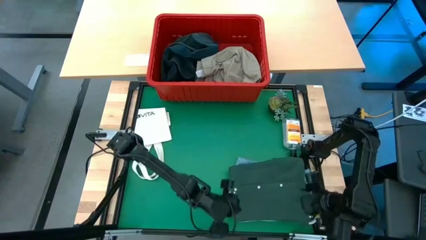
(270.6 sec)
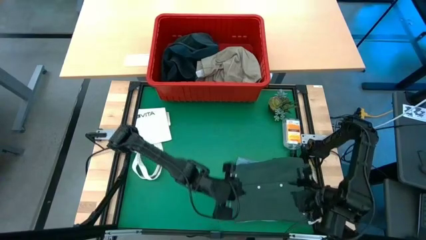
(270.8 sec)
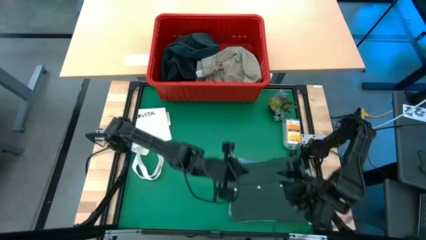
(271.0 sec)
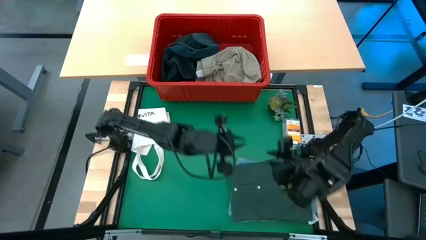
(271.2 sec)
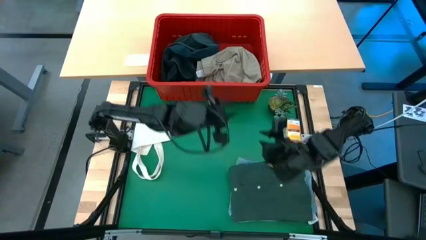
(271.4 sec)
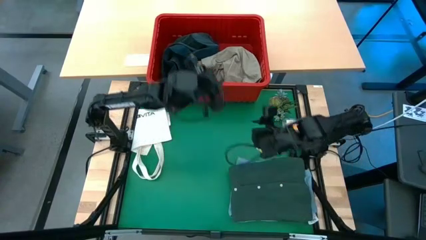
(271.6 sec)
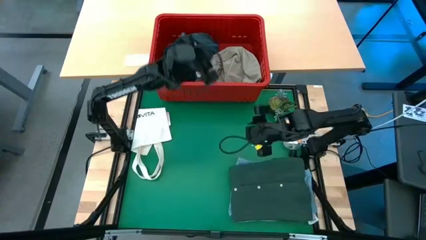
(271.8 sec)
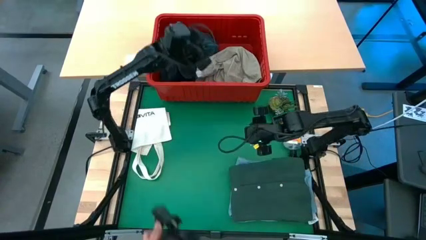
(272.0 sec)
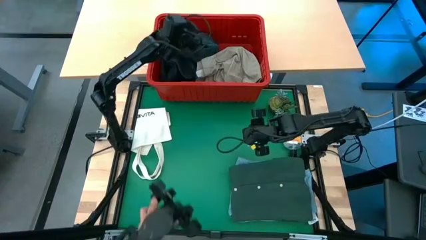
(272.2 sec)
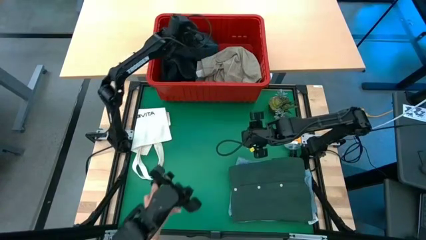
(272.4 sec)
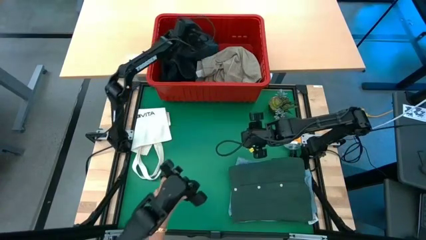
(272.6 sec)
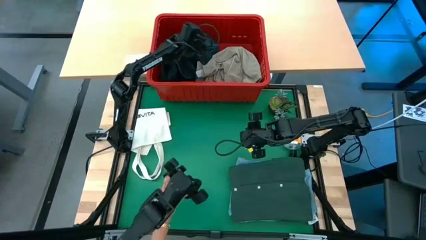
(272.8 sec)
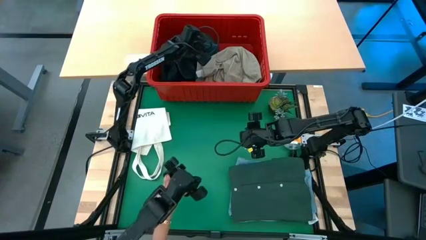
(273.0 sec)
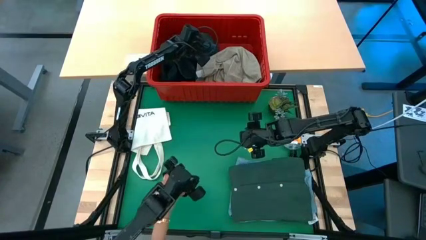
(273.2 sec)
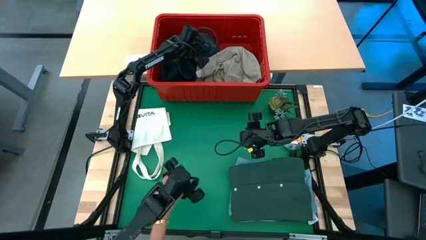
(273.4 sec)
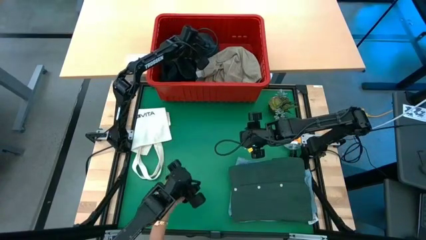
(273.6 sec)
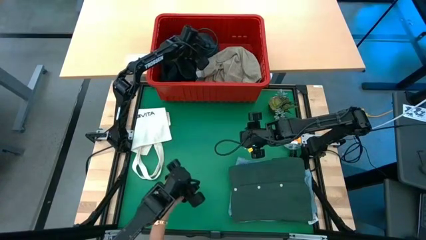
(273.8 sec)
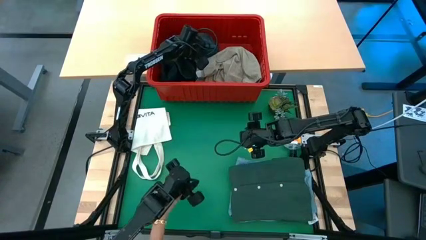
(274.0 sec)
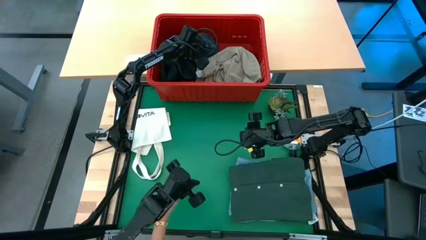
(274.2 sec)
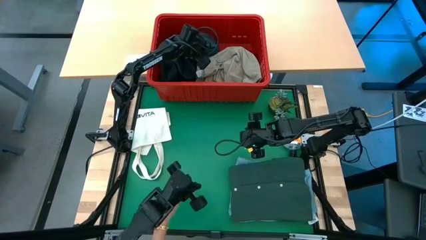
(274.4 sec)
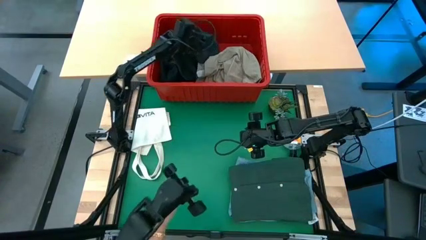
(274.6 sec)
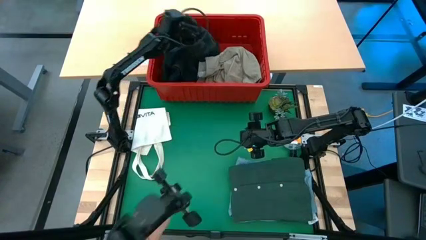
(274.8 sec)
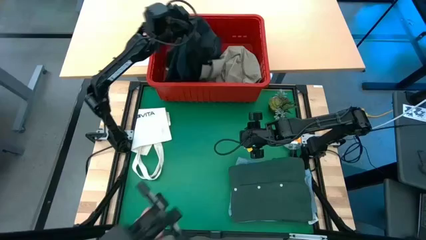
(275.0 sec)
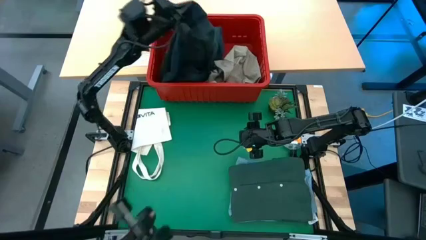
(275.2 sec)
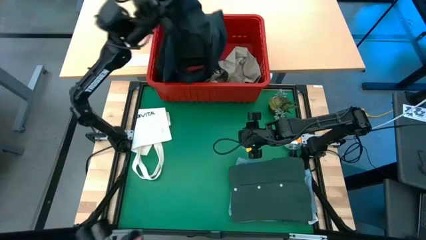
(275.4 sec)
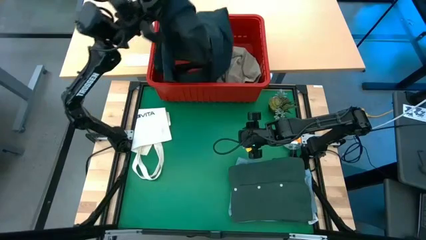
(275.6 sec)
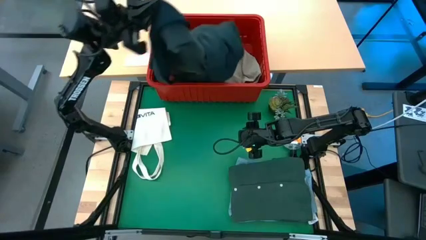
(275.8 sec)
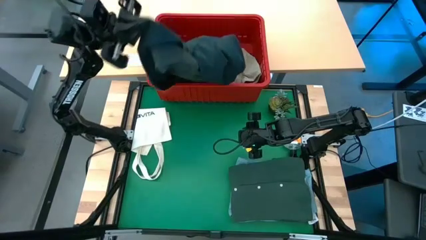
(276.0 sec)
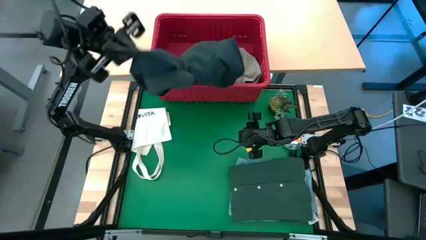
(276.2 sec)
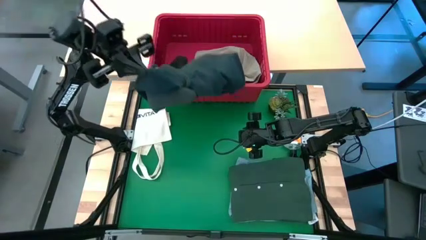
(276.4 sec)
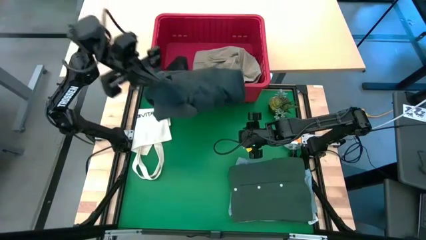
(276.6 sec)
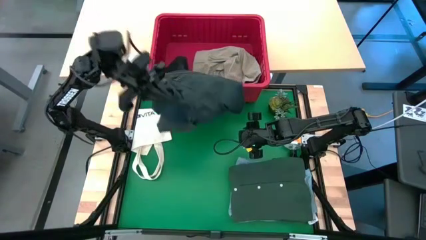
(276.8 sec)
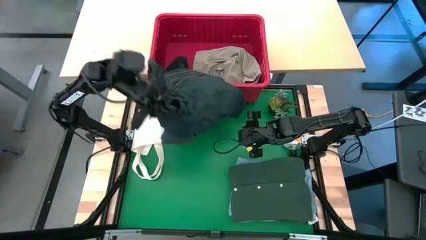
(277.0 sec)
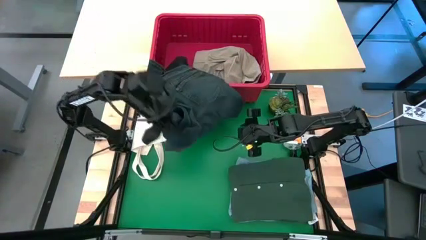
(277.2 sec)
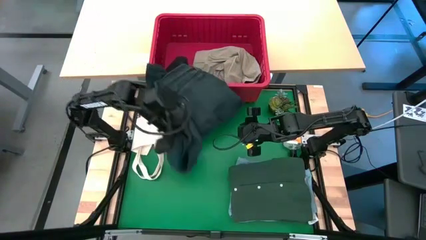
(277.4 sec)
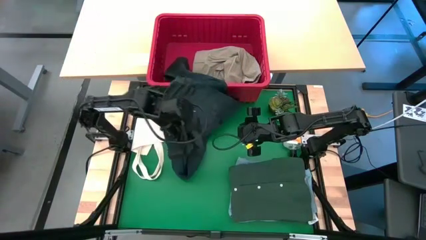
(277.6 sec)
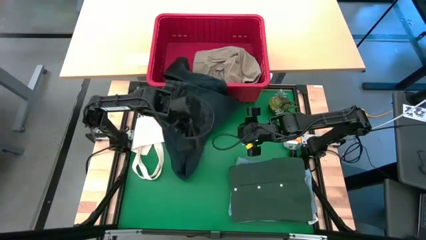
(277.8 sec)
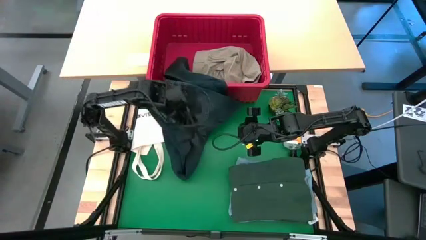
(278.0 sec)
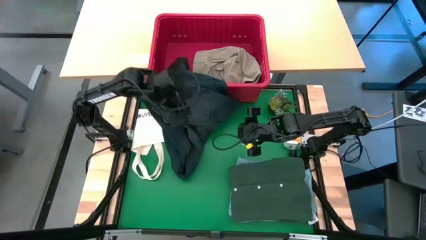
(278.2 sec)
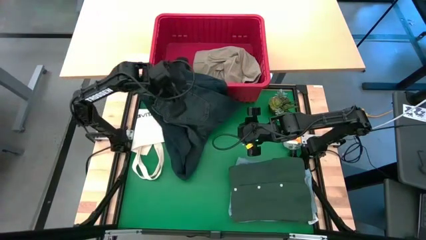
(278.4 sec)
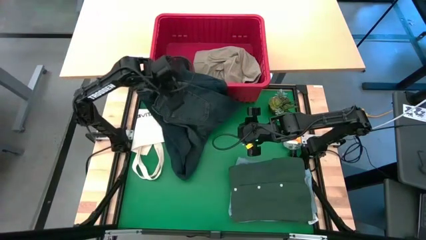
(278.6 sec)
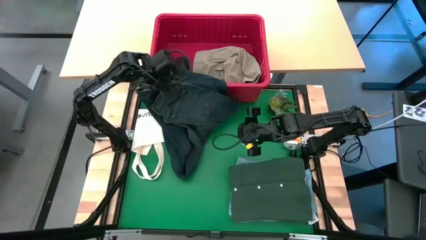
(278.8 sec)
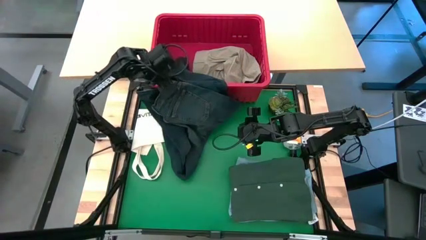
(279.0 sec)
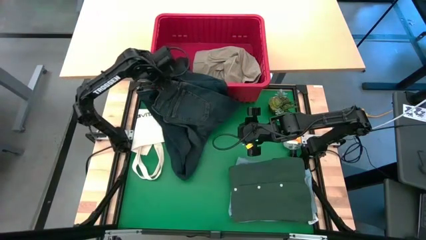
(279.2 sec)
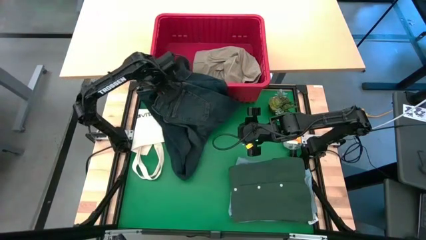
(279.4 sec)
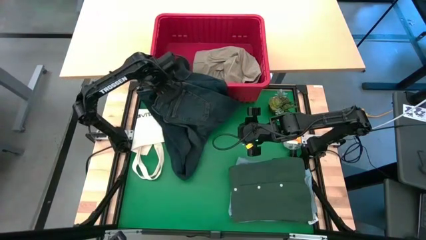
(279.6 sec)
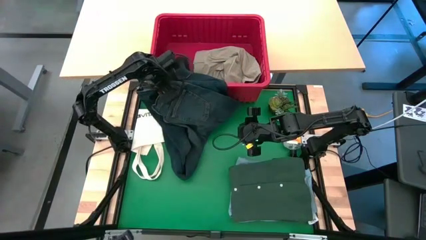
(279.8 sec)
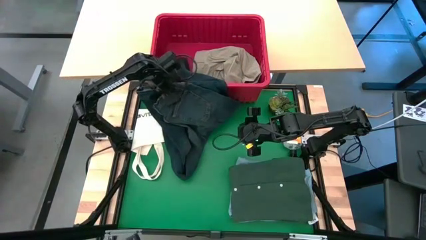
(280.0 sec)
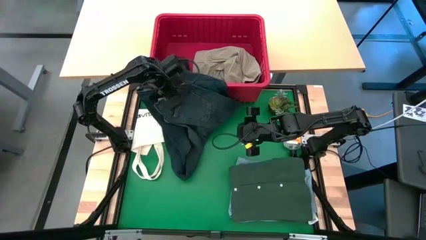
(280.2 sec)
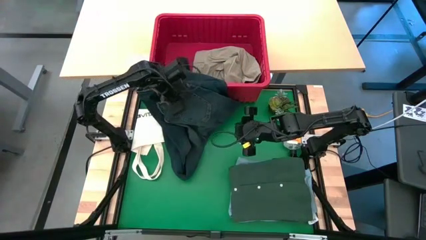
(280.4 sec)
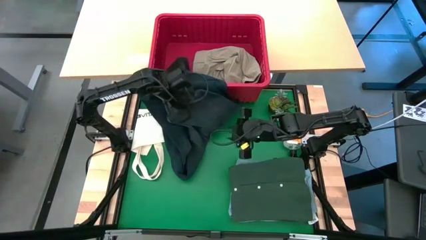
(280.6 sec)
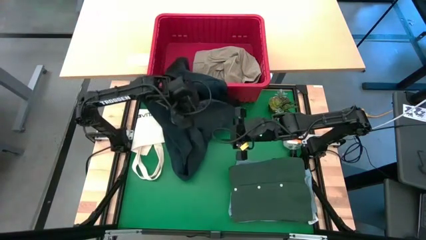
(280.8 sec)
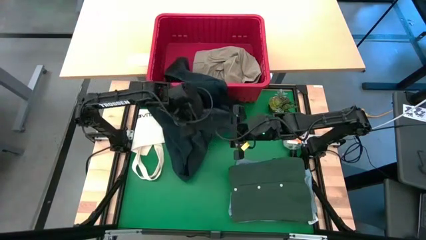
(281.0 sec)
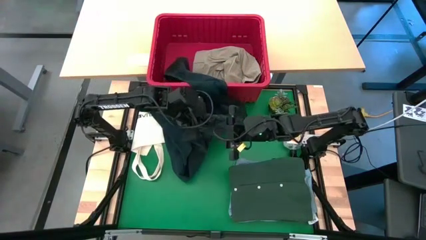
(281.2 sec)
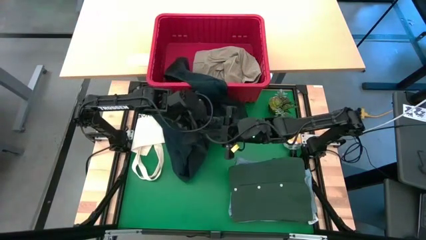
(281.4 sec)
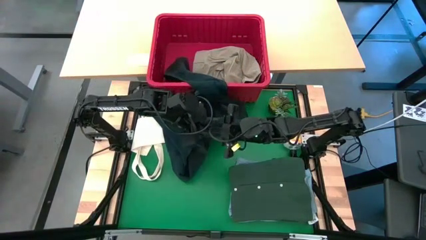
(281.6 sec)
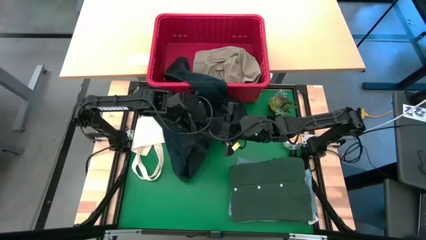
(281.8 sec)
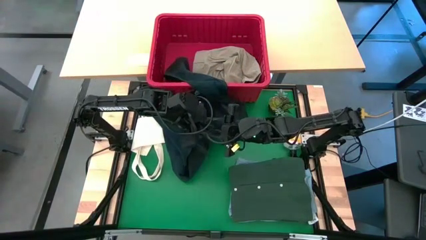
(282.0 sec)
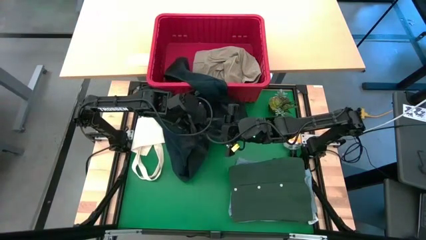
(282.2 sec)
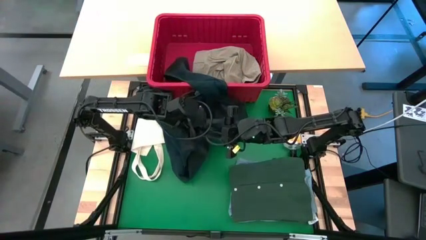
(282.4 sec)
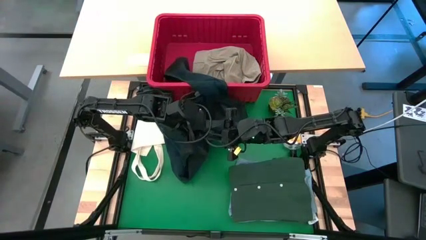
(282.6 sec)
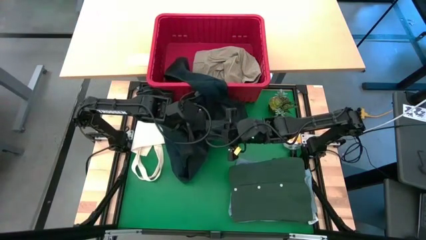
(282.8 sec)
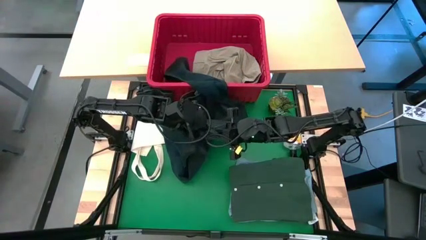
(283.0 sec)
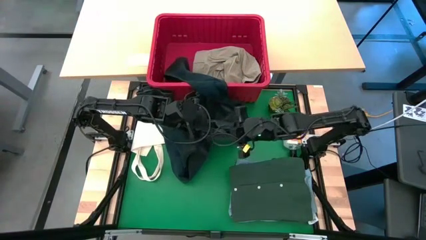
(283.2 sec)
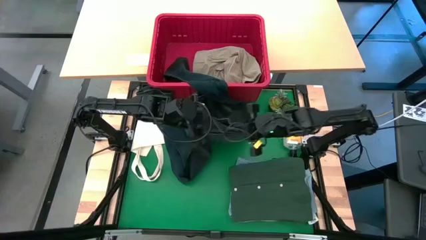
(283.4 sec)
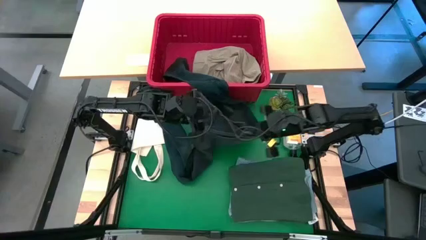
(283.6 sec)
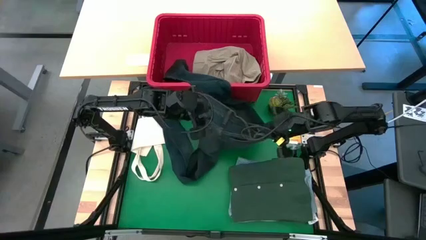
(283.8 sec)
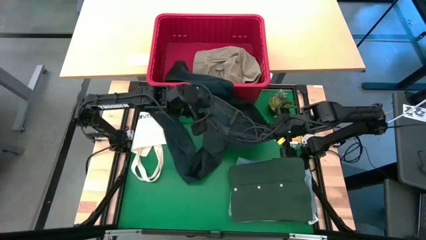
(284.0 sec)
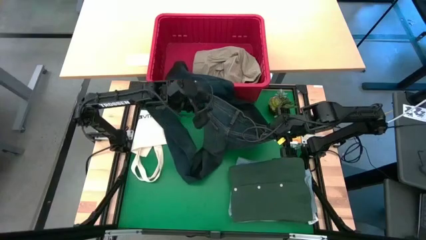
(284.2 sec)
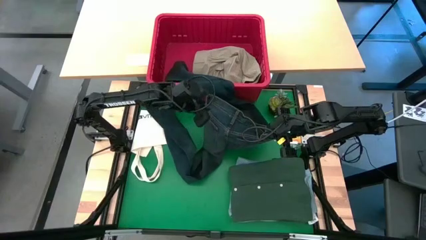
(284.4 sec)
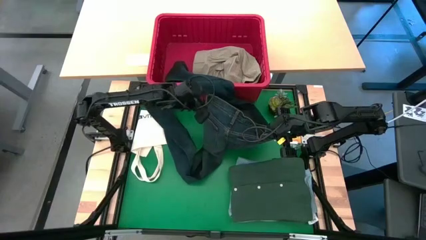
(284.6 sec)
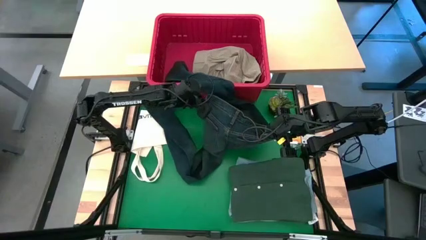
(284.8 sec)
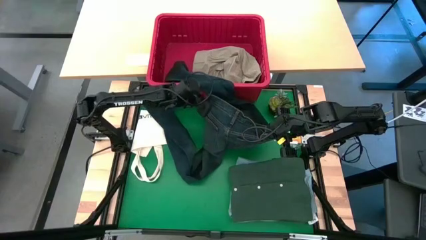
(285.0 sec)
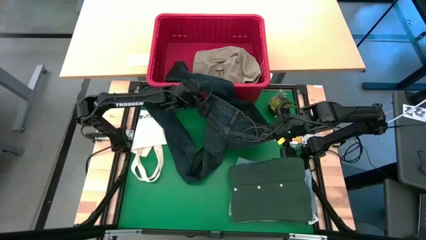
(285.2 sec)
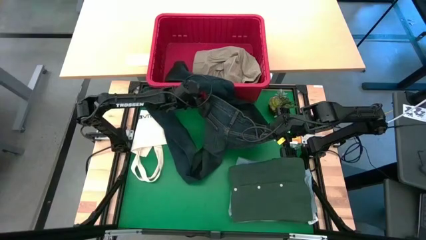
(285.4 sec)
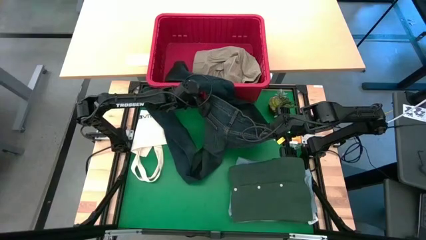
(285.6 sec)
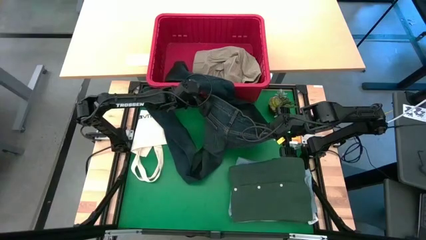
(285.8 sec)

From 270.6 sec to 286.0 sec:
Task: Fold Laundry from Bin
Remove the dark blue jeans from the red bin

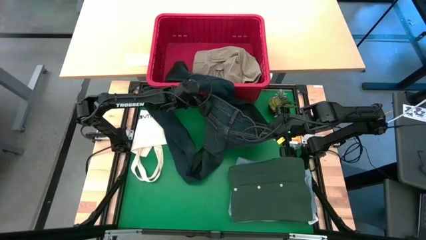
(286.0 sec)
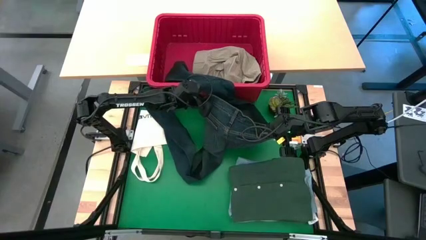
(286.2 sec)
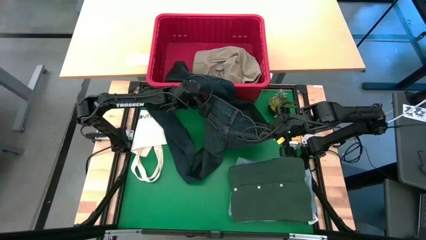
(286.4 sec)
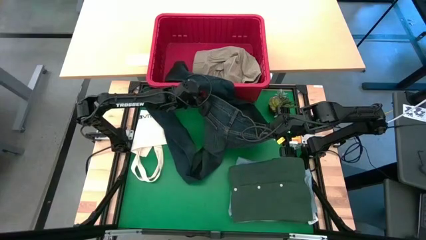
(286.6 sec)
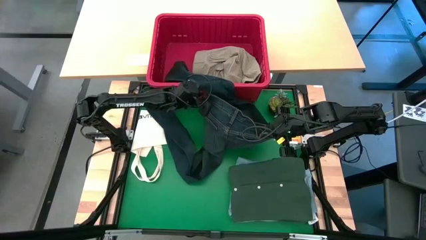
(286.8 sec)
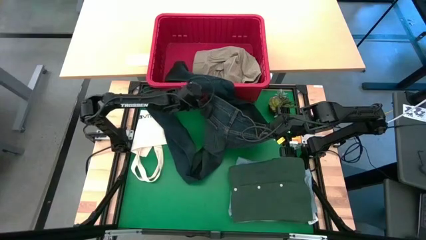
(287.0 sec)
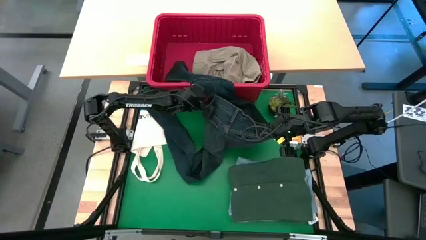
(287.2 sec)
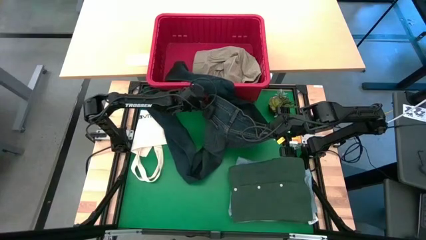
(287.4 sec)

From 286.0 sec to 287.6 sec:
Remove the dark blue jean from the red bin
